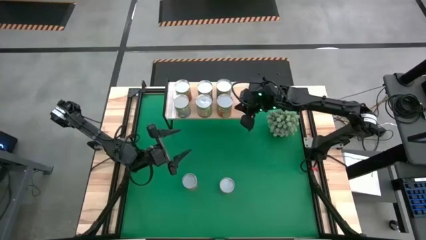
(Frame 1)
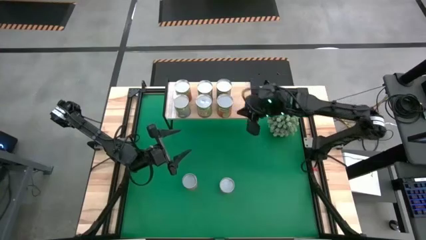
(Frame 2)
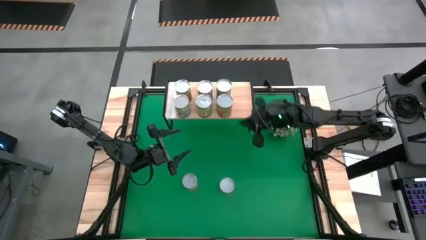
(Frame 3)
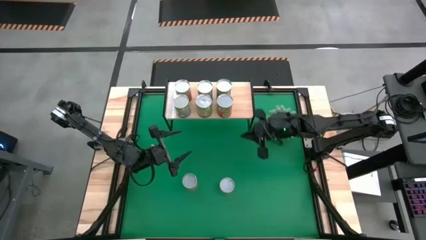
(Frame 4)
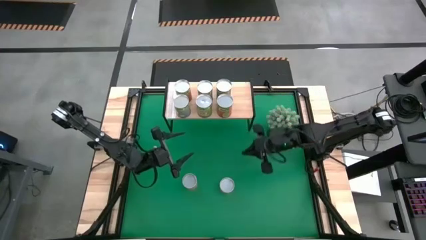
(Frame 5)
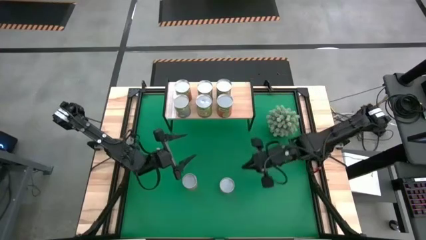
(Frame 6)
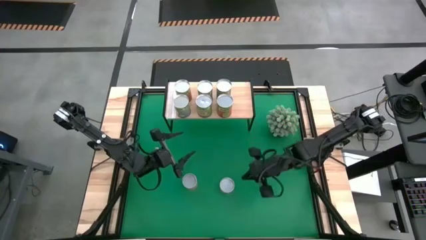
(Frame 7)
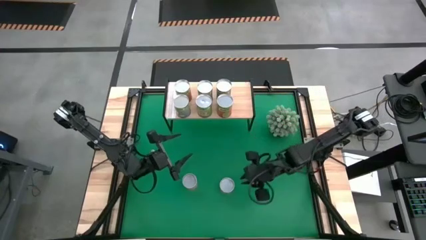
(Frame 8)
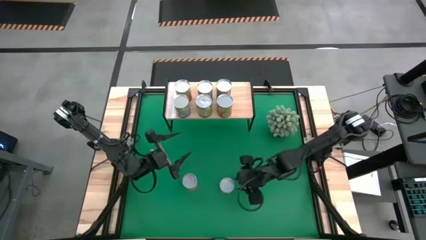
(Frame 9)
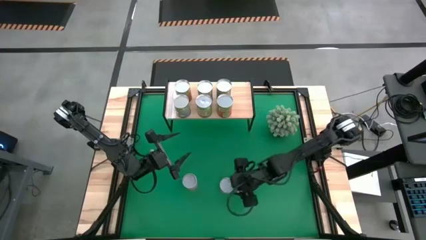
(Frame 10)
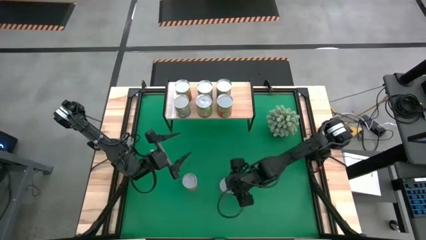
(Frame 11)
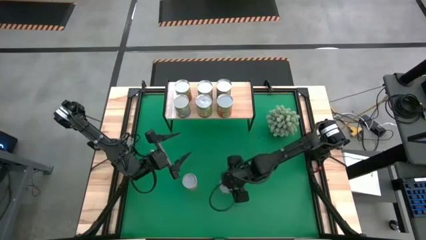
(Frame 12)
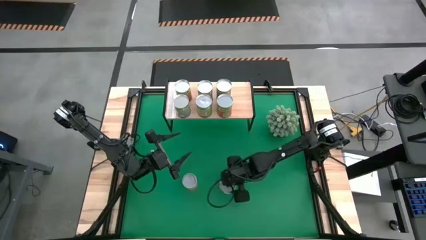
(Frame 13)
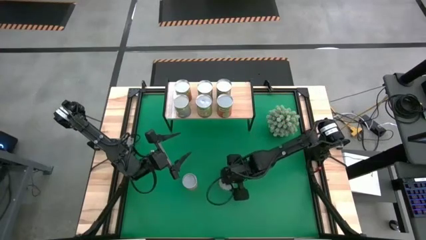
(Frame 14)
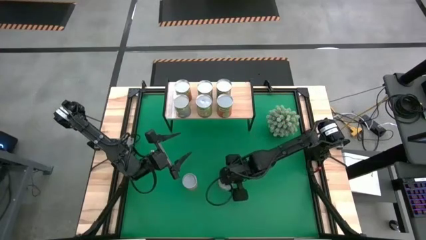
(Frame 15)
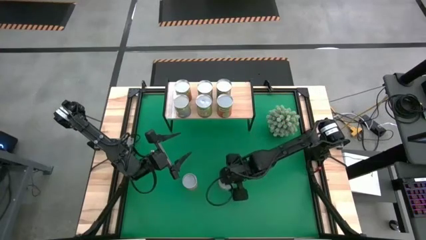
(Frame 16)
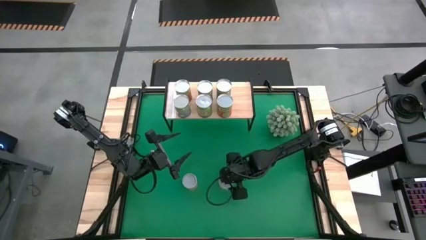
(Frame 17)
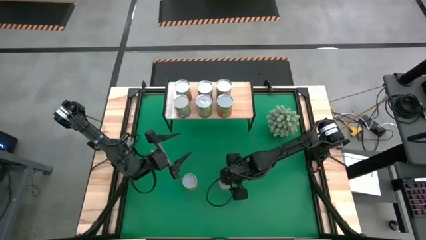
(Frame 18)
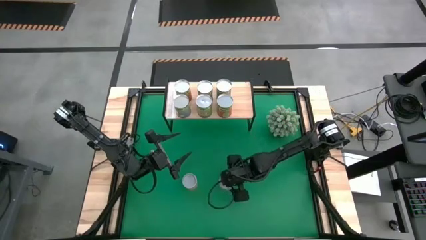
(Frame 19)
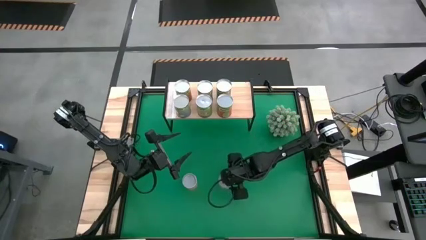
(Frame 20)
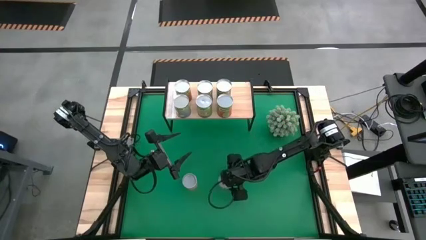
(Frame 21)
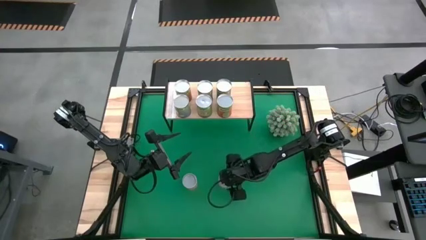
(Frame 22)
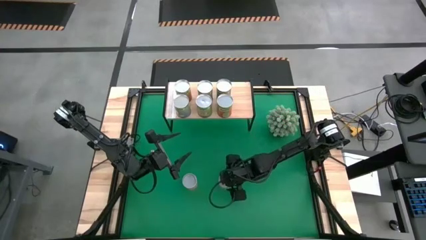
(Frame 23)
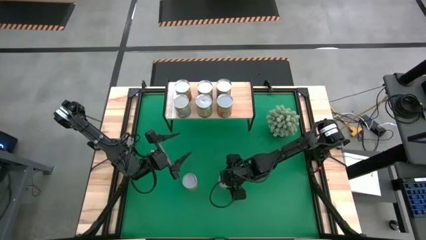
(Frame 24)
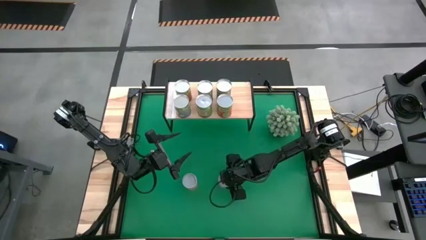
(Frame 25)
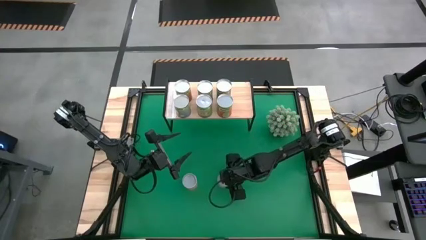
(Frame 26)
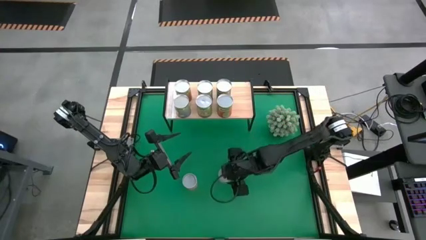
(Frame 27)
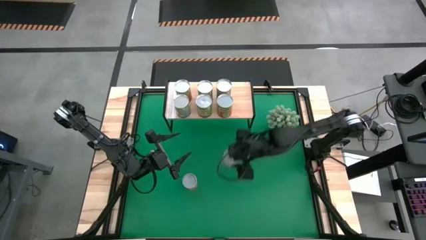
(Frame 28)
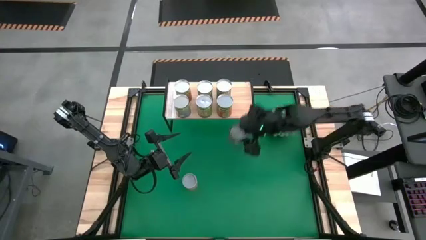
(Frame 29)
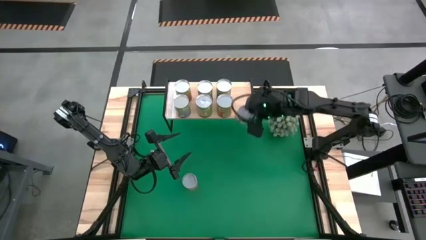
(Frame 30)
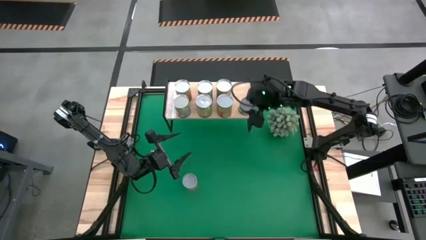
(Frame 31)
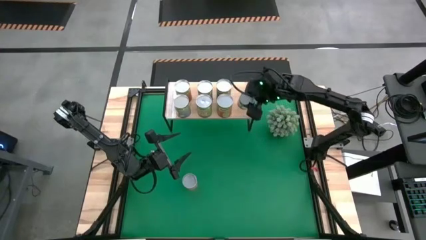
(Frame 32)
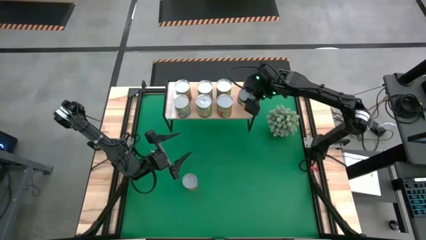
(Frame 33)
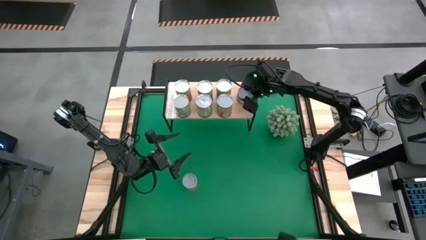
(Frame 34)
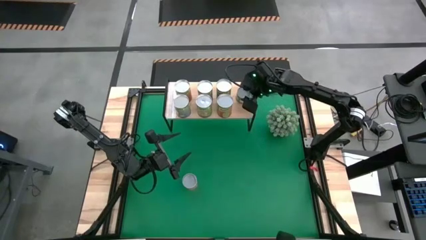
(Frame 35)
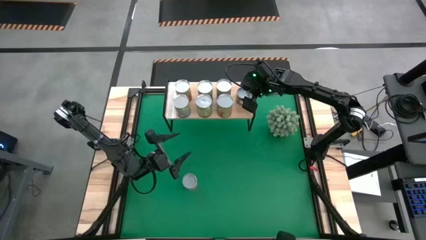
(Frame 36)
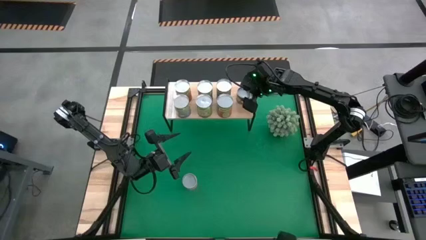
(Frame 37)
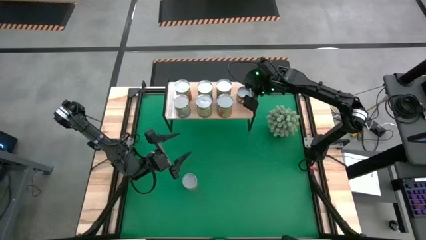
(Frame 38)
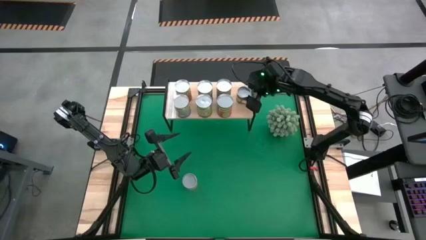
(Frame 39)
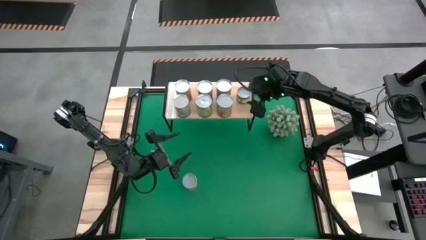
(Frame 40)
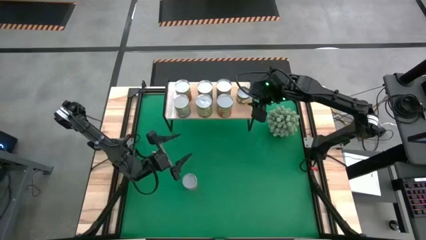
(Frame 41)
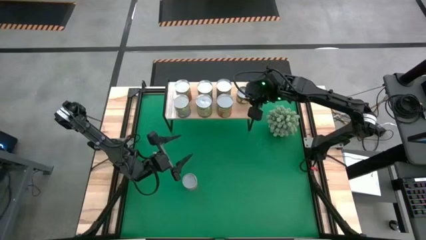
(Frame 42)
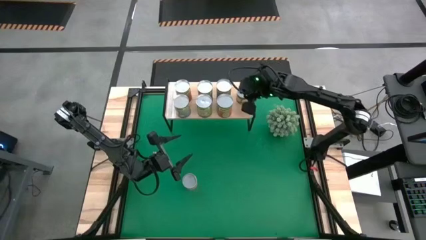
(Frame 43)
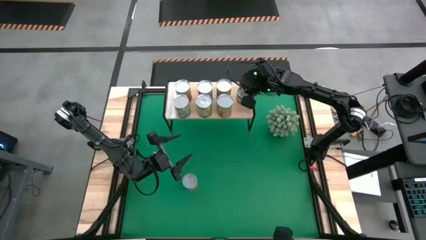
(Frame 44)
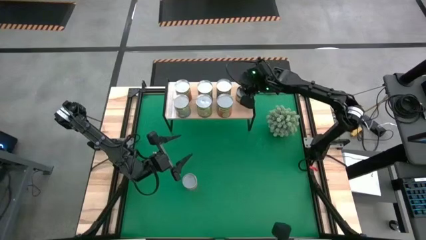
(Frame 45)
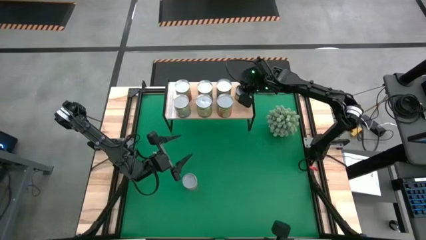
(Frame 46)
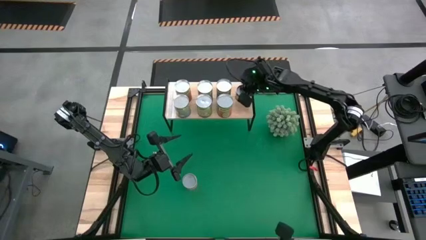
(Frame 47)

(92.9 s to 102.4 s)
Task: Pick and place cans onto a shelf
Put the canned sliced peaches on the shelf

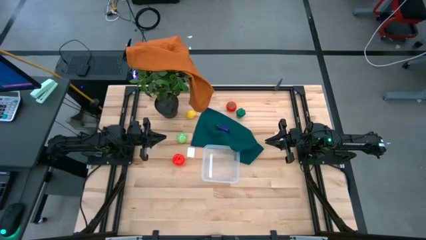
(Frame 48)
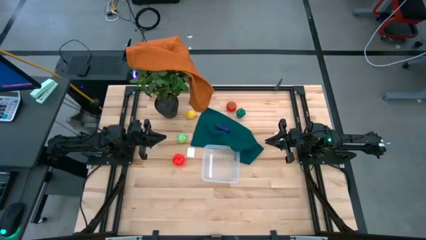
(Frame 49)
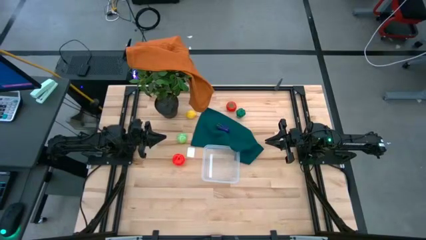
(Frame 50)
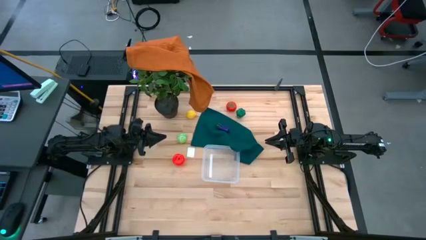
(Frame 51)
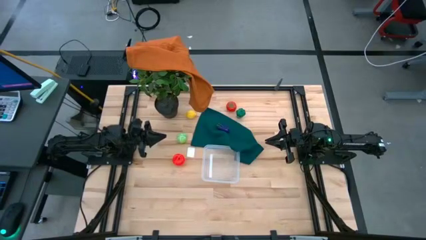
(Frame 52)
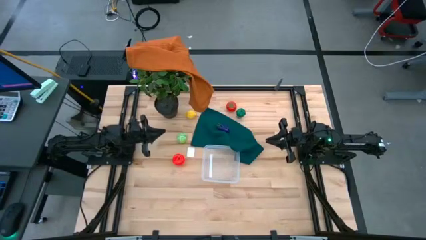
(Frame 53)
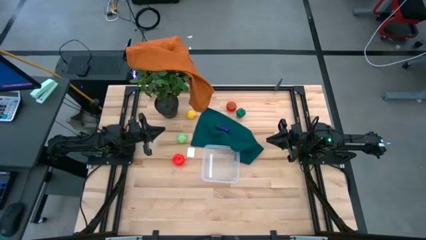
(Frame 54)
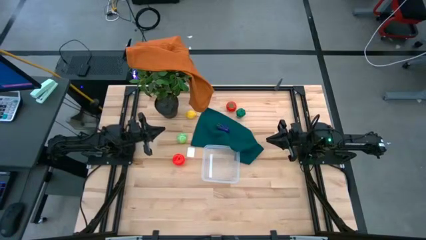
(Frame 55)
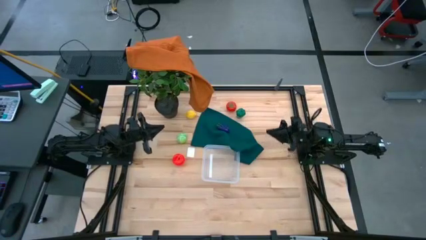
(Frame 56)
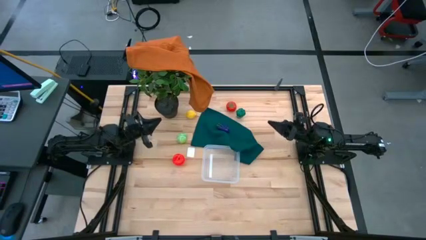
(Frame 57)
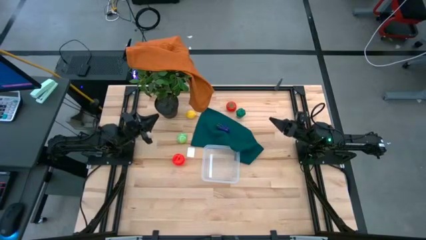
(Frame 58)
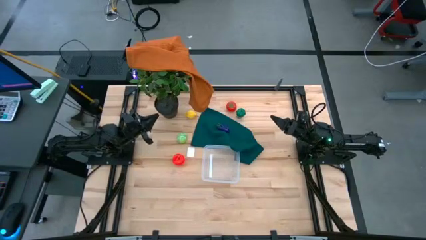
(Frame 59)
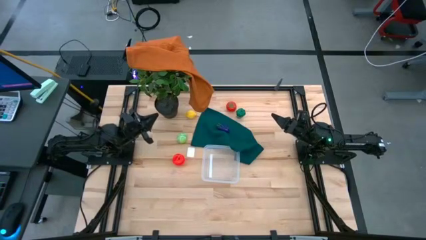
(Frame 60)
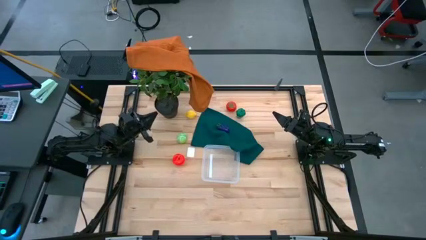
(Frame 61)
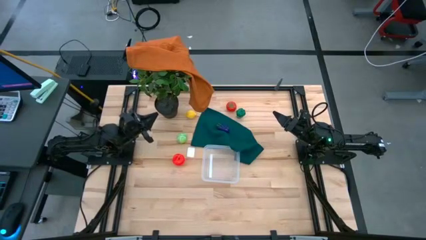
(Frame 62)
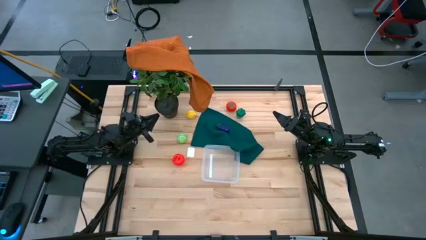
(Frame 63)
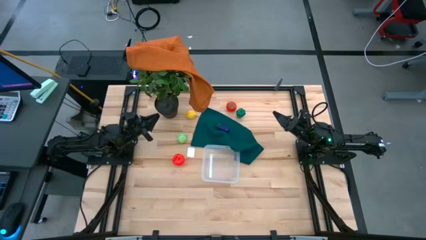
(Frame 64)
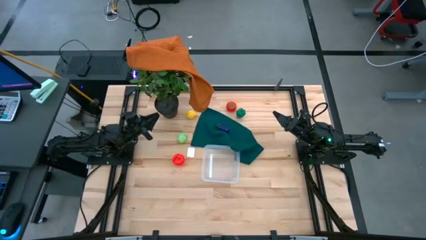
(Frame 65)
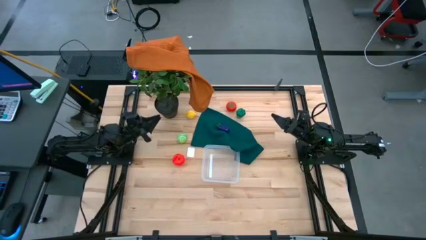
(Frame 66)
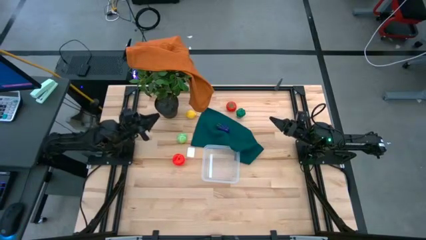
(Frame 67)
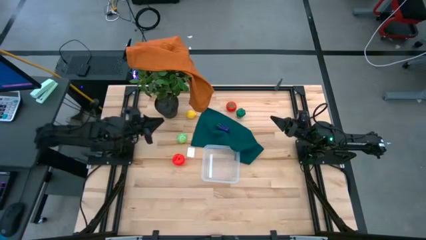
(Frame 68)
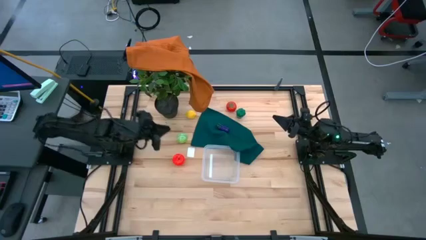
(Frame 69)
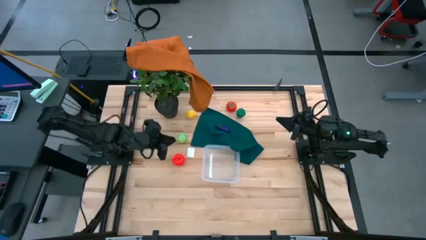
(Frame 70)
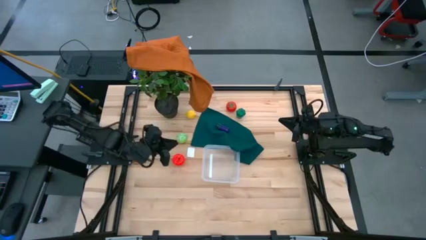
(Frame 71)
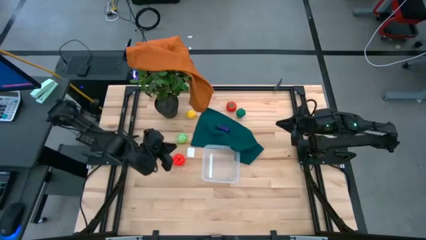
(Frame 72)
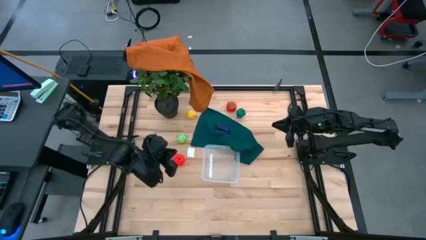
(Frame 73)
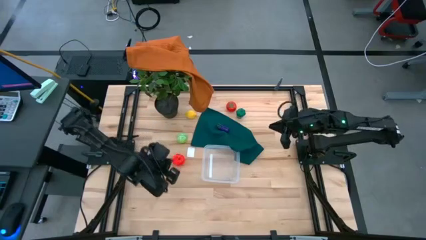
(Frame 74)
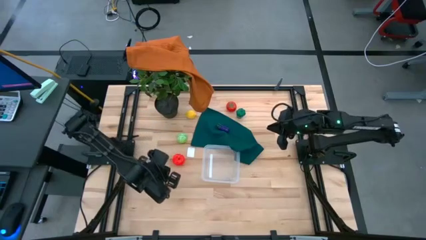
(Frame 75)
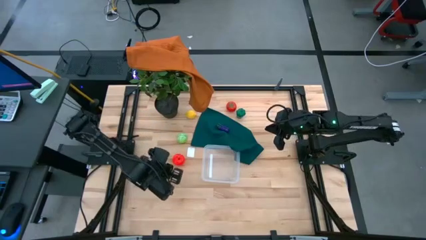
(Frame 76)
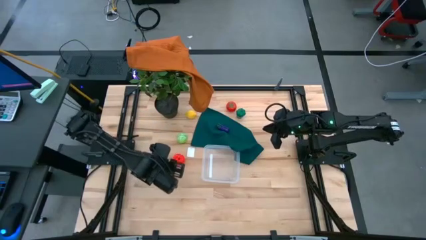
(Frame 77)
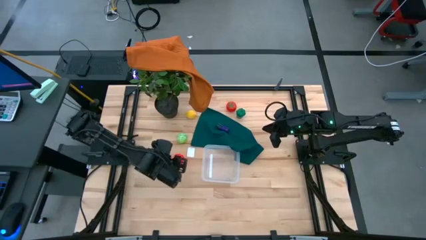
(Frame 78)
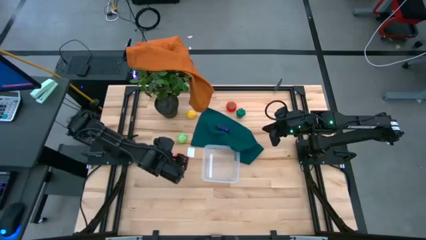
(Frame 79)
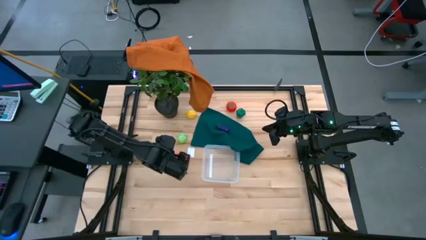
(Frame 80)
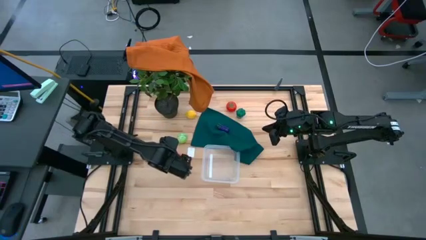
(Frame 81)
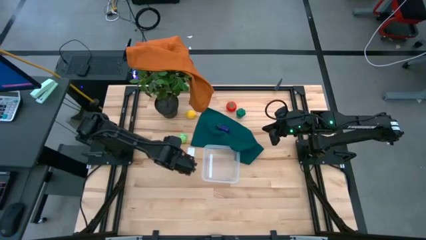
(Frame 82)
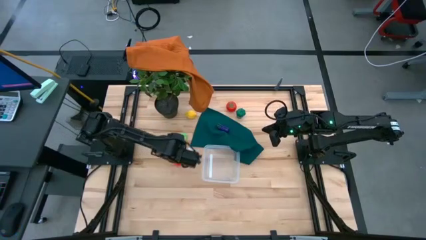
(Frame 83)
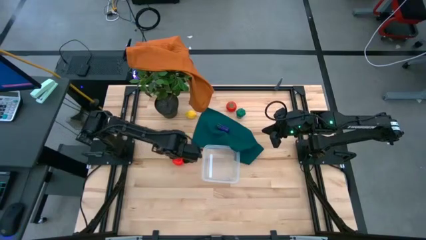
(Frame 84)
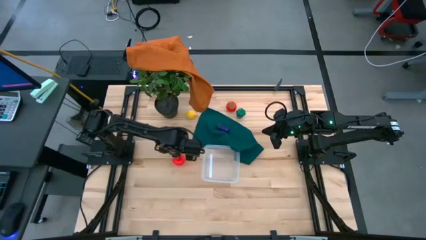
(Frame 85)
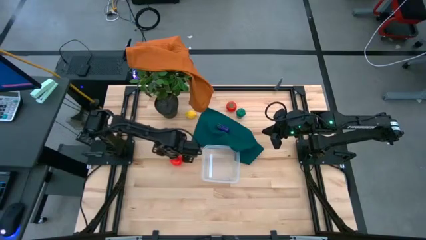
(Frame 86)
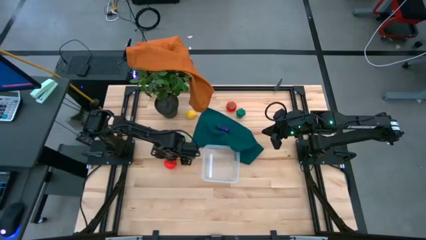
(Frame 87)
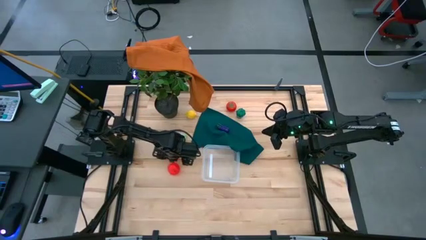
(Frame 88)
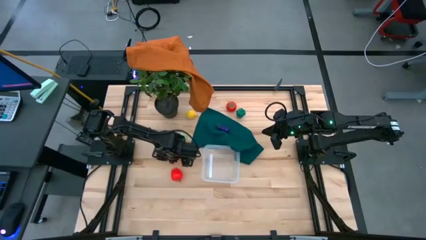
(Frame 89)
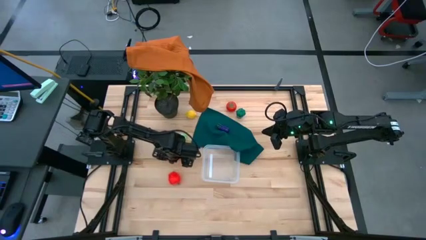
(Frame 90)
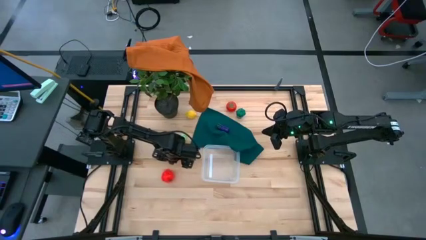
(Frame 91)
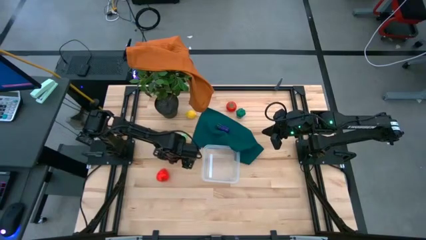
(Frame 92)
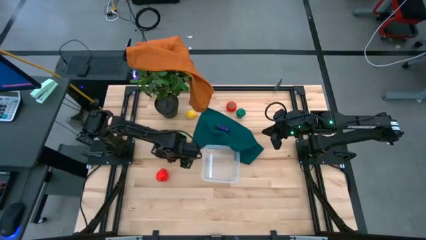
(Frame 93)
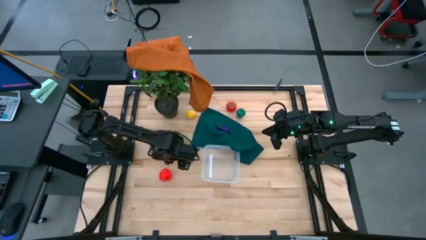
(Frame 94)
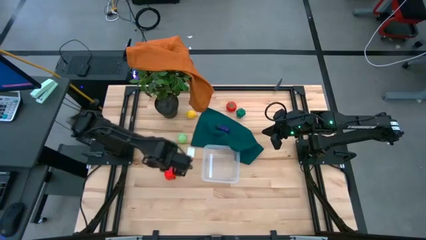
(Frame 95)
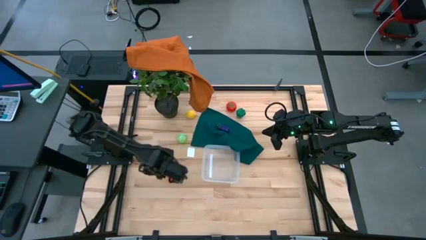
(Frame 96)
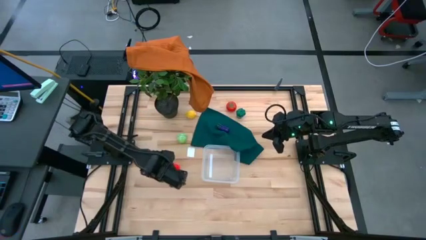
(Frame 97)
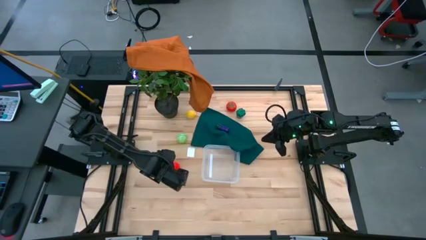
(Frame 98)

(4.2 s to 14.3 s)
Task: Pick and placing Produce into tupperware
Put the apple into the transparent basket
